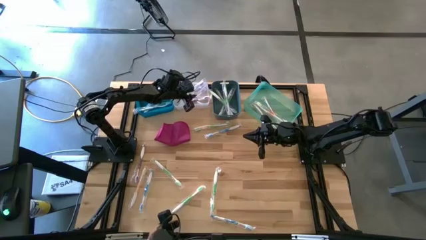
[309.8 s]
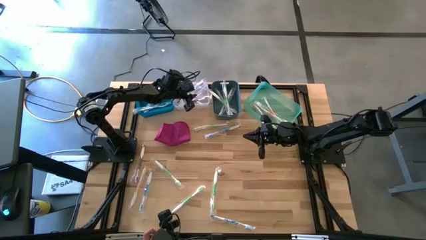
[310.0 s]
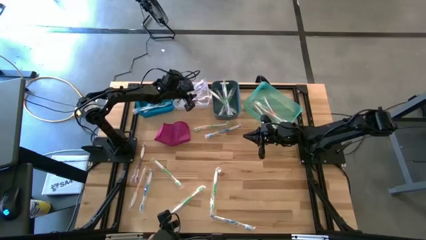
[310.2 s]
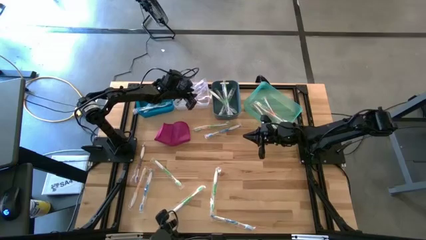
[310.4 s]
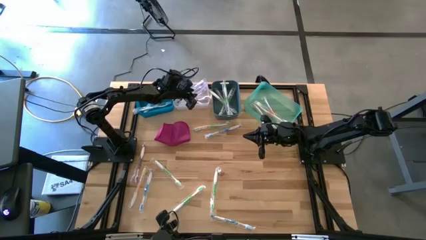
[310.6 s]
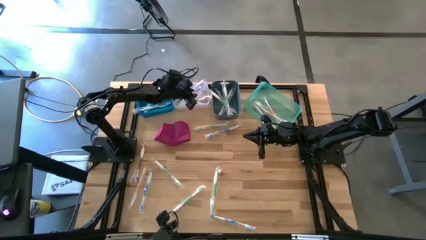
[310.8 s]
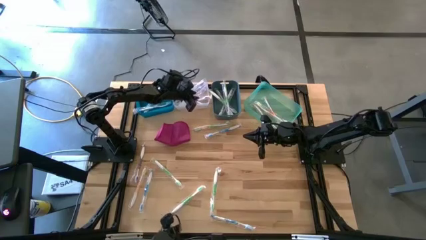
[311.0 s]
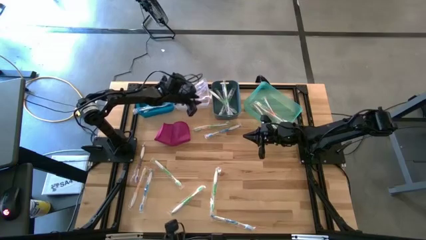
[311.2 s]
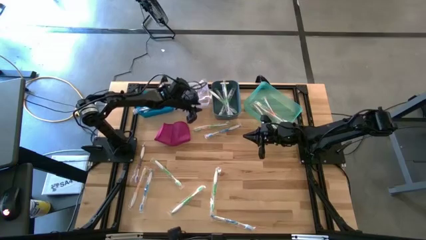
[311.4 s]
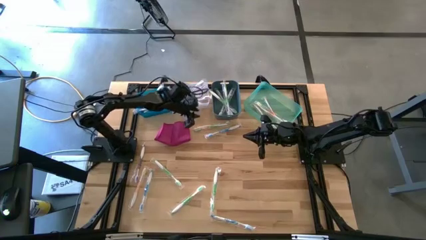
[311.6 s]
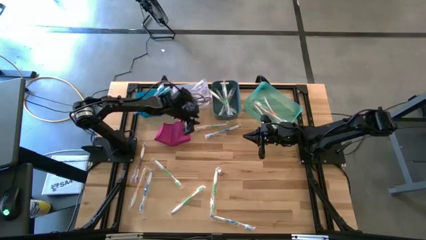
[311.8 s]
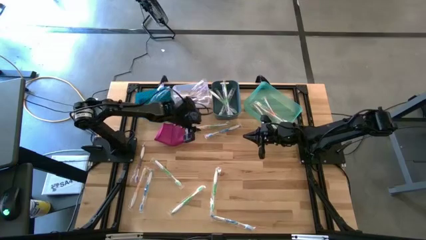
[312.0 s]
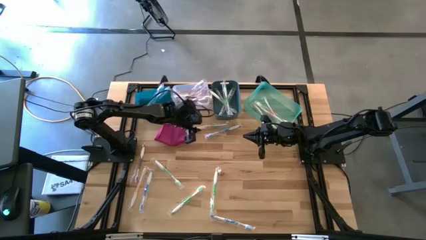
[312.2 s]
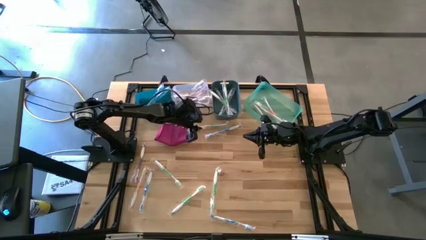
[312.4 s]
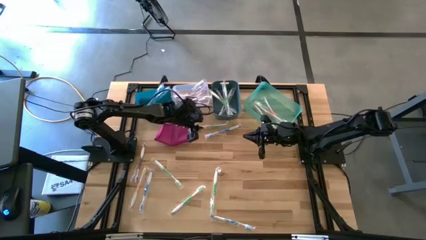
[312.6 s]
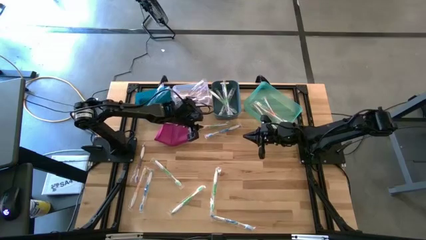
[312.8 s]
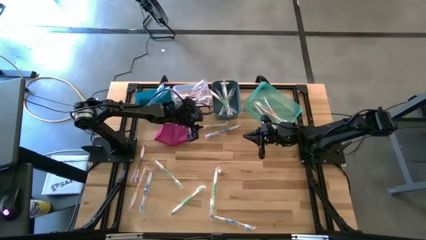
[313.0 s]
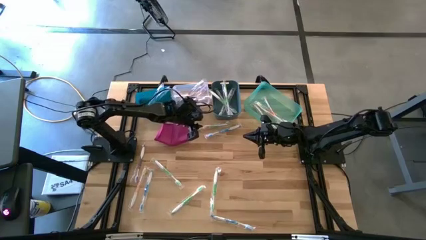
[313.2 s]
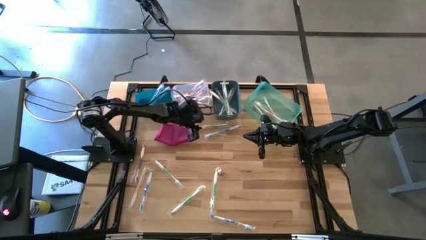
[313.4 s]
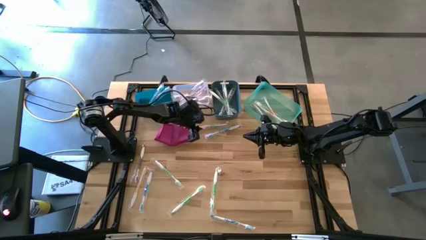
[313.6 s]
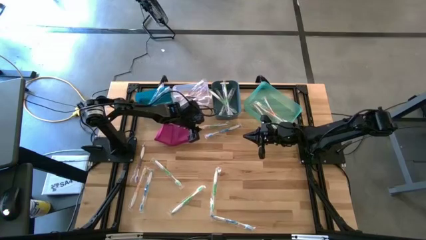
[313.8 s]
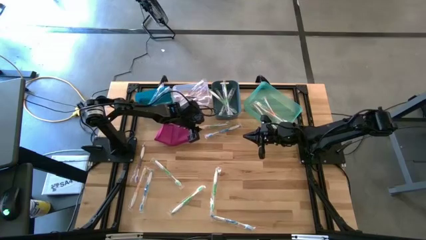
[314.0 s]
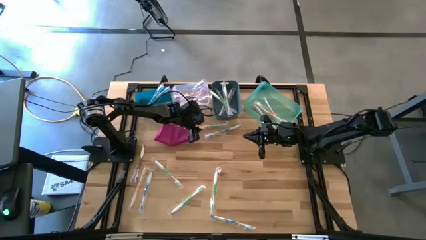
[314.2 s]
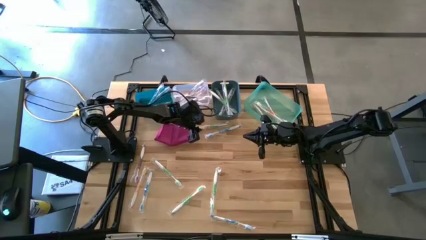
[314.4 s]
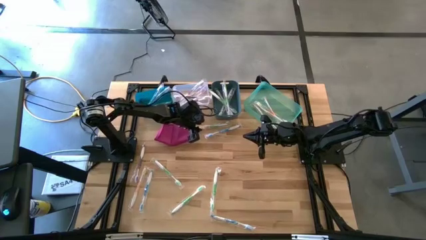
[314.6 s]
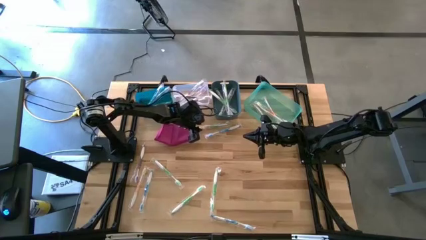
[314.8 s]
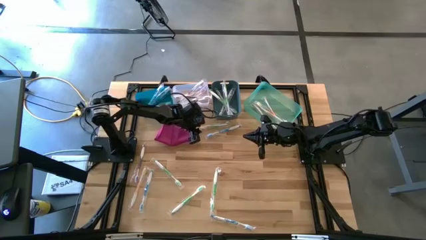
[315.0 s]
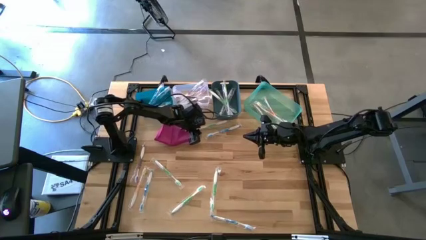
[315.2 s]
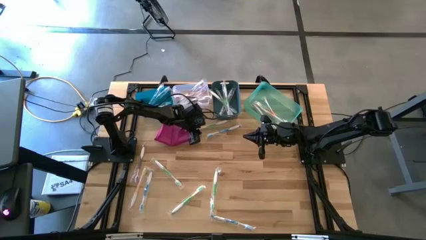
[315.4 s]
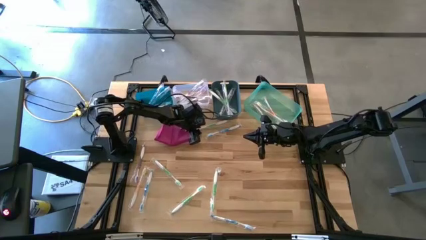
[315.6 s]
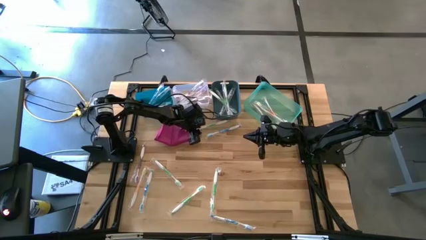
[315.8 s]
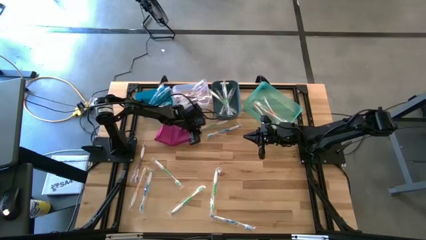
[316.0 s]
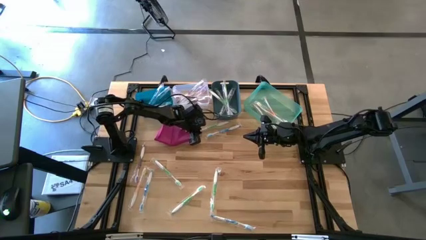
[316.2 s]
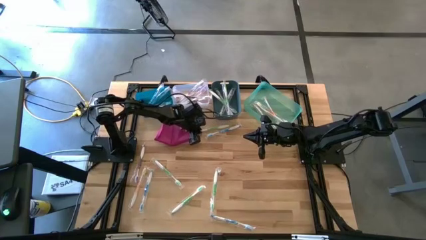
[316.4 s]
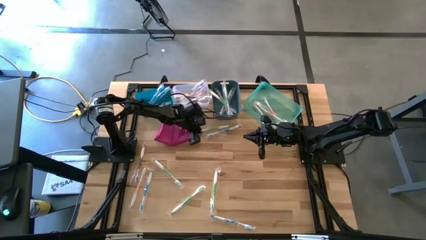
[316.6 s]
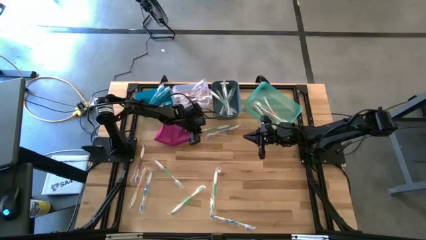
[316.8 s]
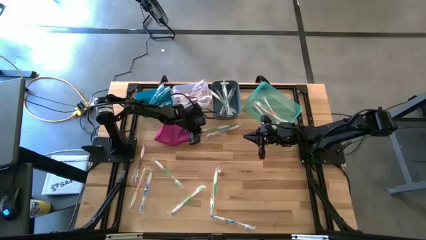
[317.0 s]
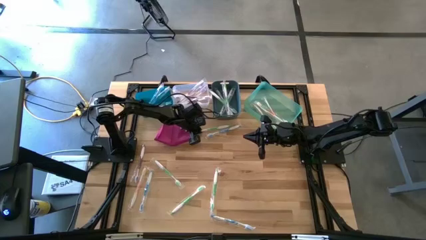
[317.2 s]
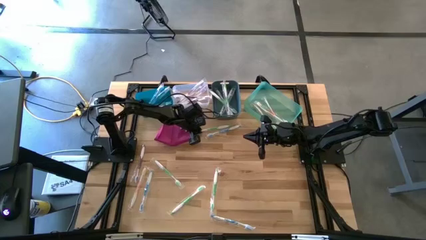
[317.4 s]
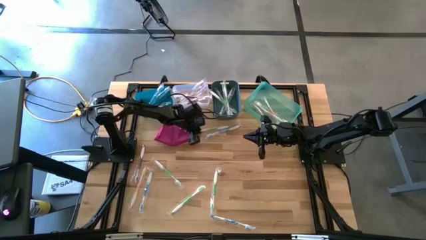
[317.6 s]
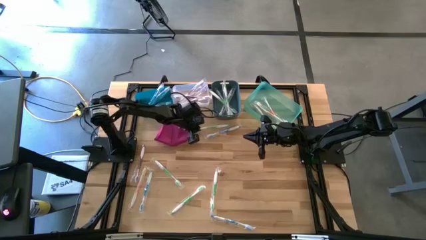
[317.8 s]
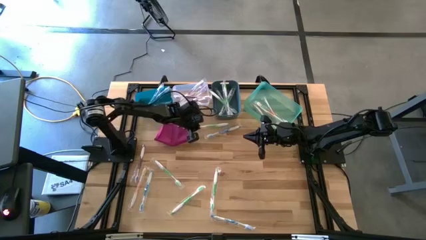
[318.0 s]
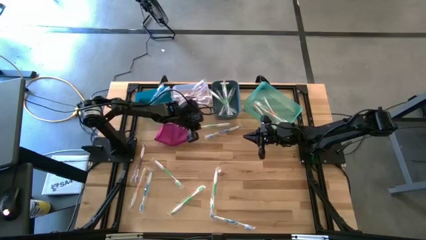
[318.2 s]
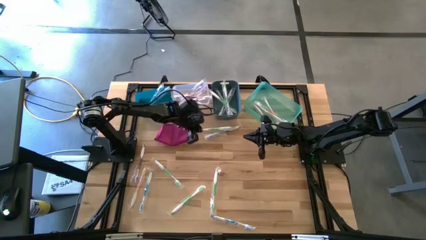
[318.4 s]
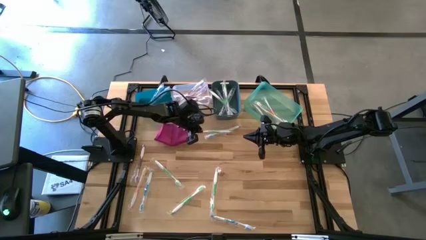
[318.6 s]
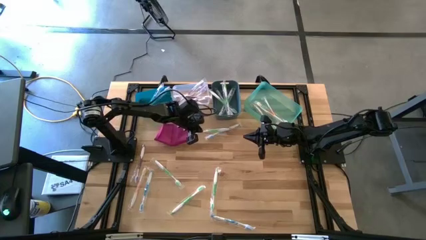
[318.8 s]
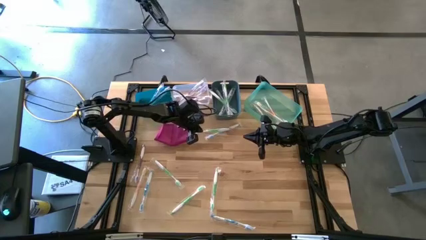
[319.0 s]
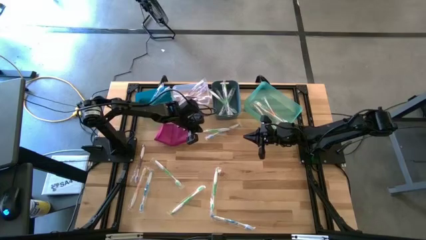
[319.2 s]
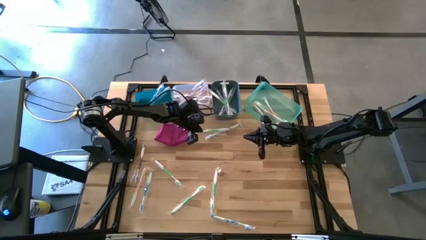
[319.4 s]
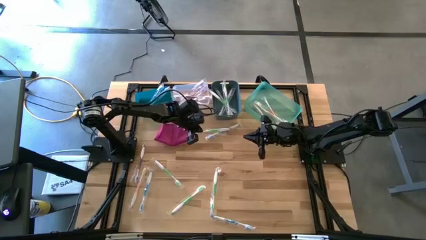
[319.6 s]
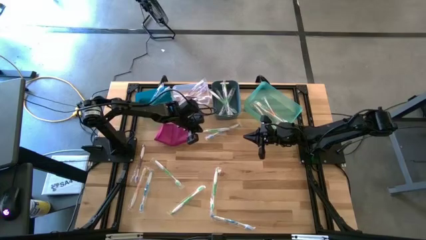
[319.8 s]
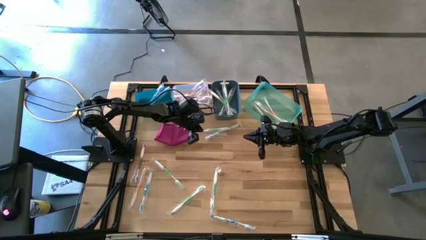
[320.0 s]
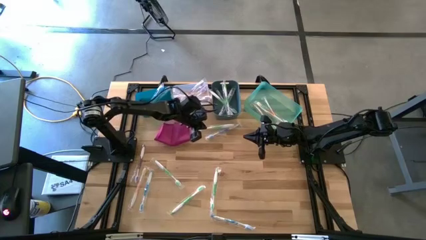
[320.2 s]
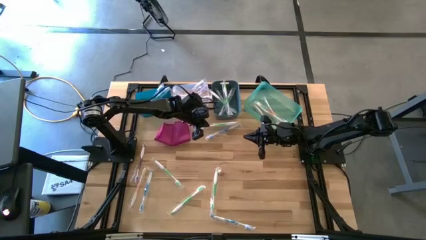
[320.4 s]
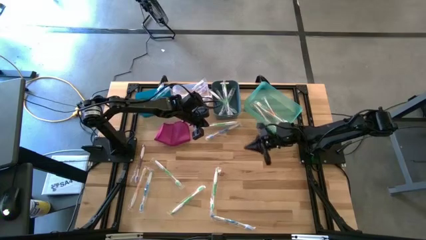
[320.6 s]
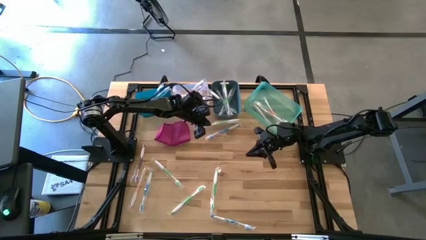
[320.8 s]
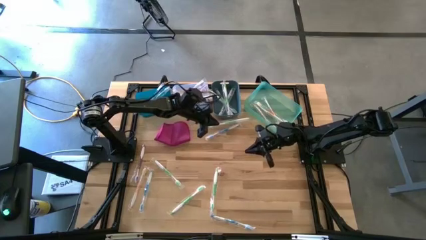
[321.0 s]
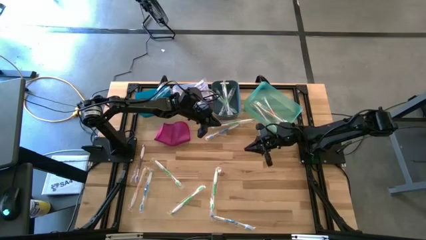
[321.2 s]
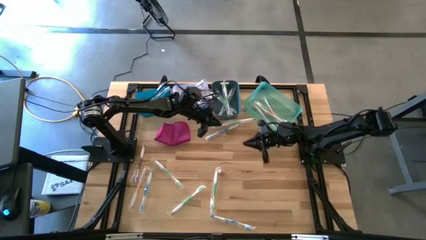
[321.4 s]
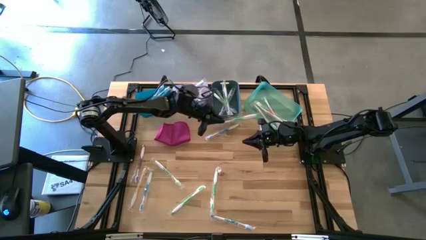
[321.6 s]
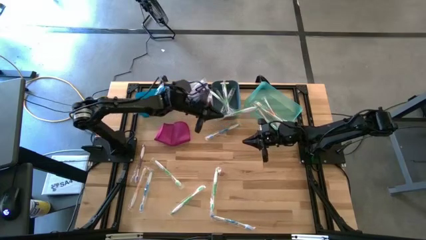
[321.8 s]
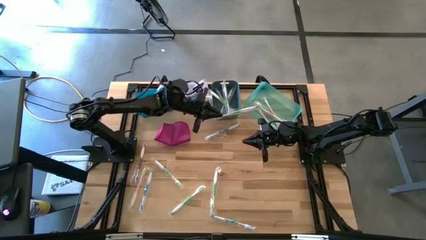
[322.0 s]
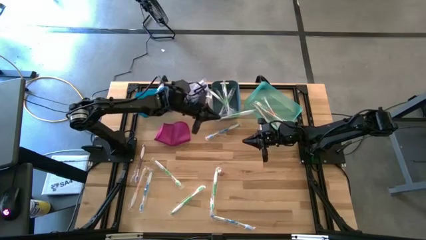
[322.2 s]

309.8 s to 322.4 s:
Task: Pick & Place Toothbrushes
Put the green toothbrush into the dark blue bin

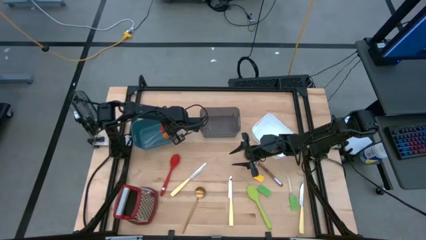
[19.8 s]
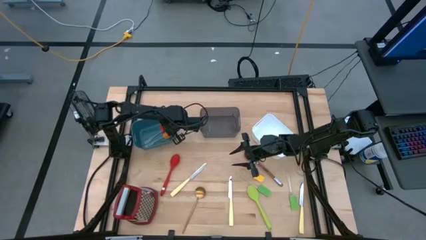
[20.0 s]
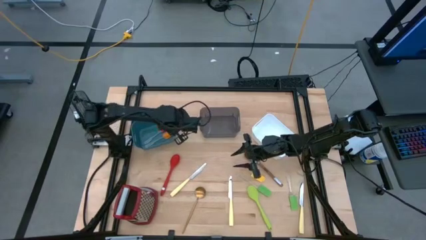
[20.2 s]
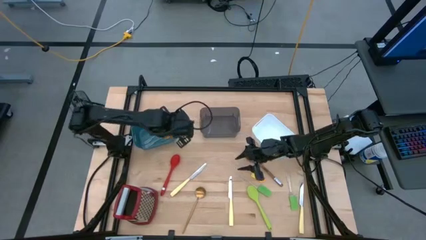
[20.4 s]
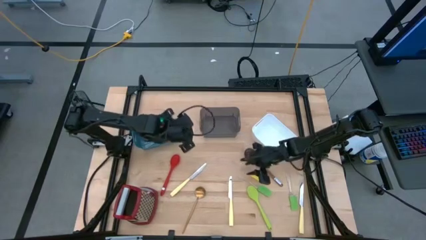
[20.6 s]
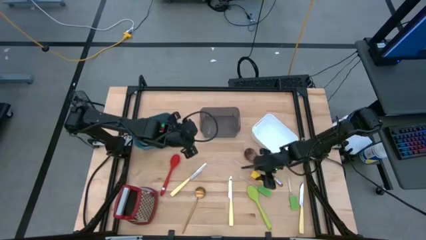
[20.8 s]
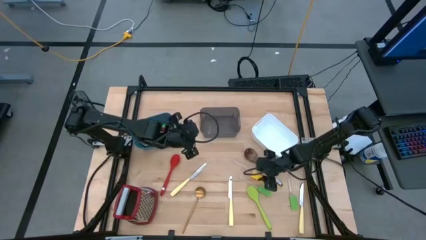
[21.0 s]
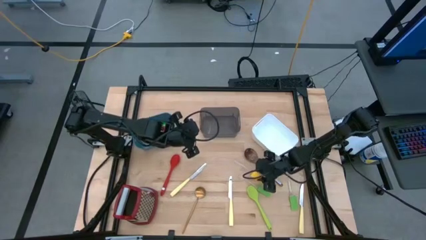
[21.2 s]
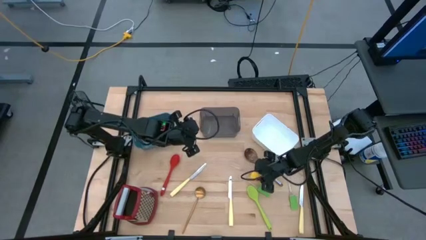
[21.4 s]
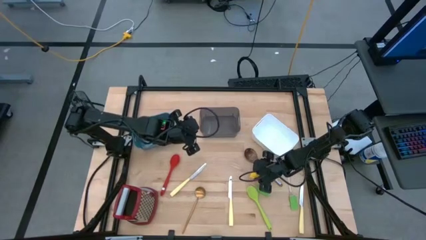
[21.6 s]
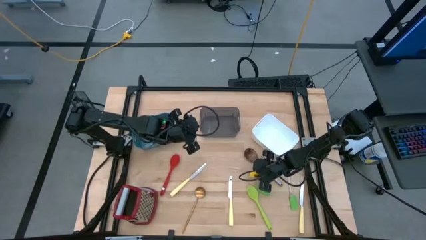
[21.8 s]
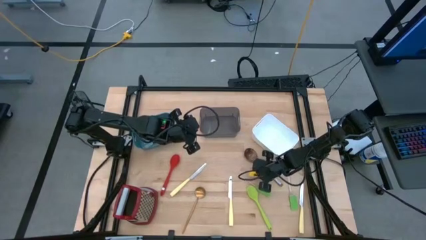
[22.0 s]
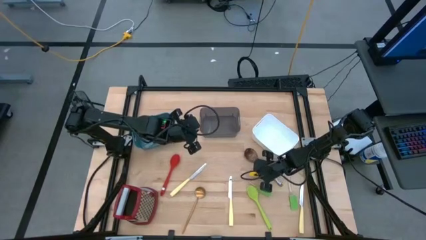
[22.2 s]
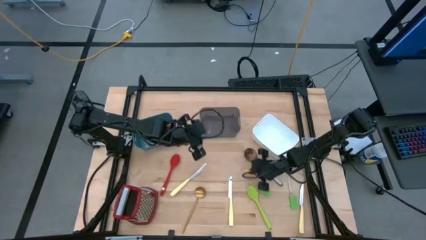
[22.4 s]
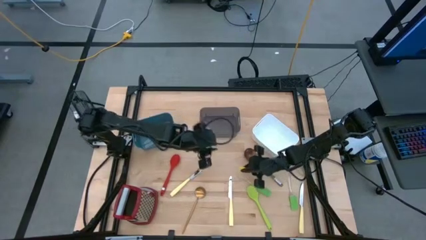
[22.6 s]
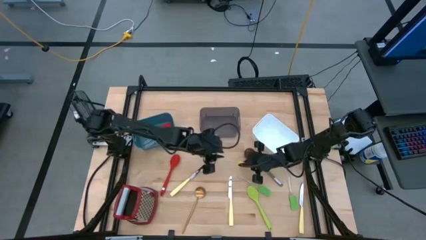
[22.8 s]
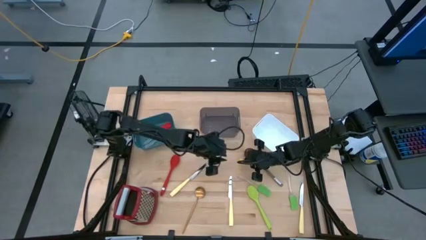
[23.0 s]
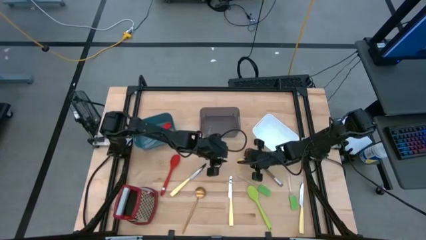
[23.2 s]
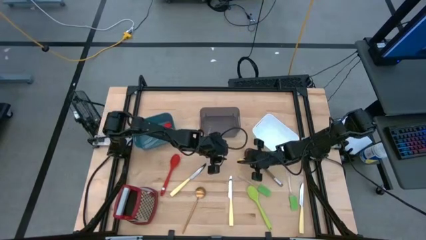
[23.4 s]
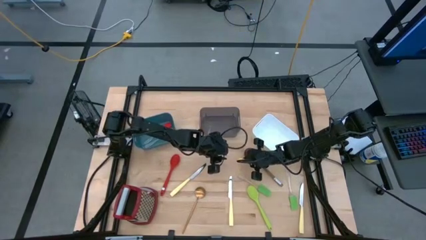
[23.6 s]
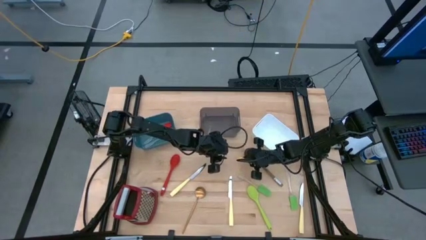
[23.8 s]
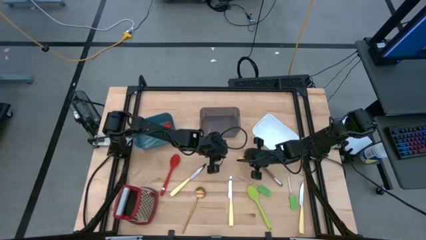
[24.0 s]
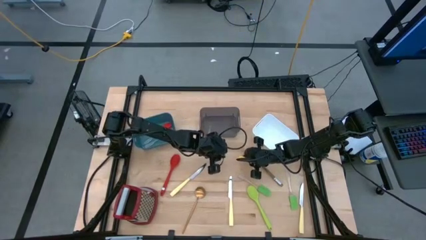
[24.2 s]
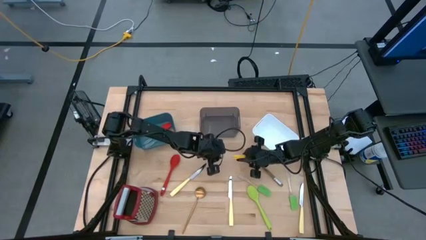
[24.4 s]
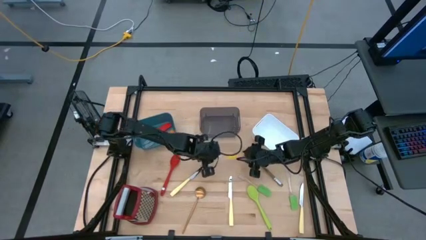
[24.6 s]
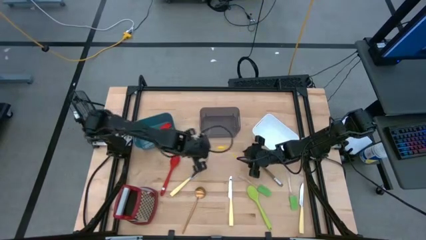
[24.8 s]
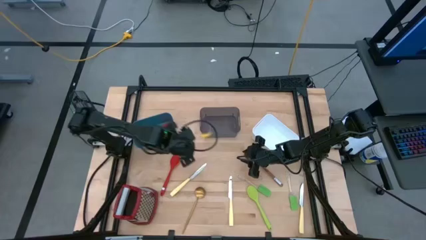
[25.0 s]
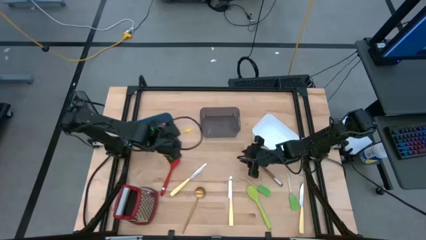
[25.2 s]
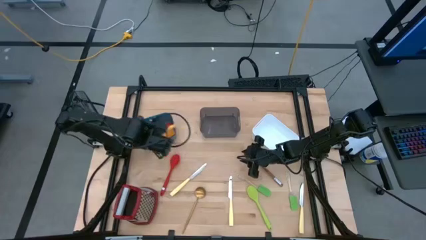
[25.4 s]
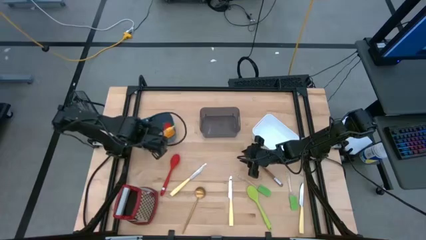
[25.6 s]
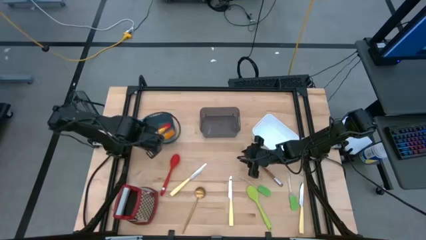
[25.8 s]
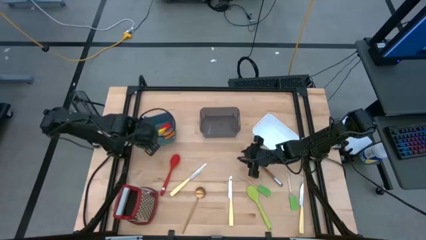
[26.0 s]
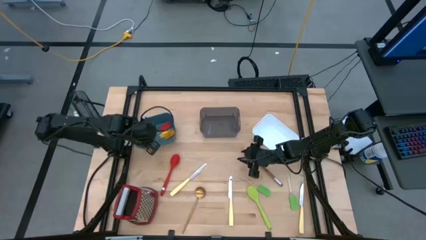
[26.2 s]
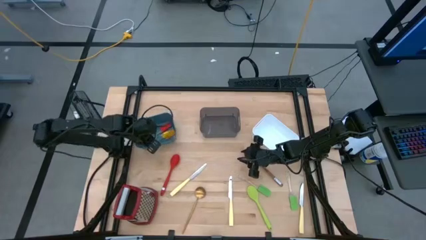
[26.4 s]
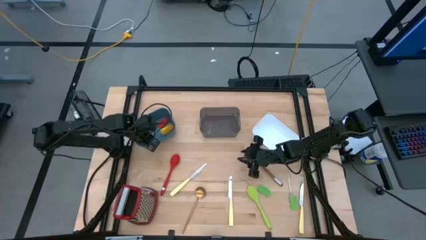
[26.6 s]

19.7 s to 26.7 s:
Task: Pick & Place Kitchen Items
Put the yellow spatula into the blue bin
